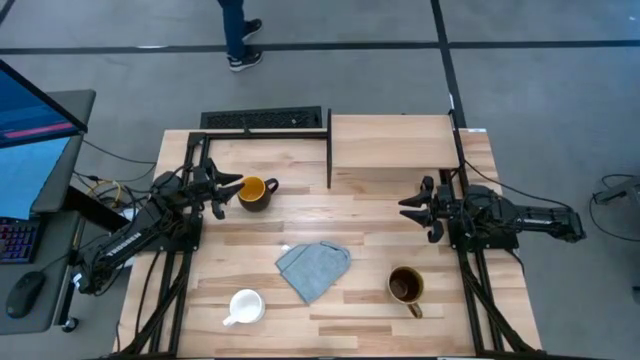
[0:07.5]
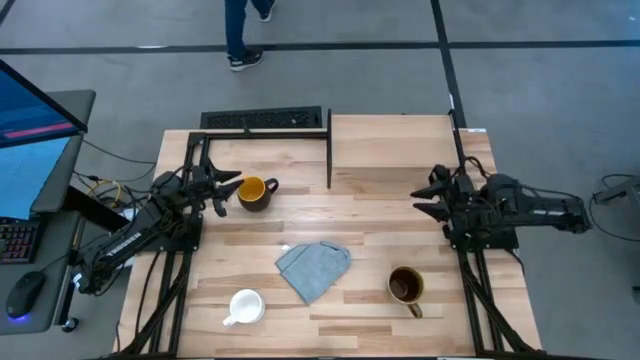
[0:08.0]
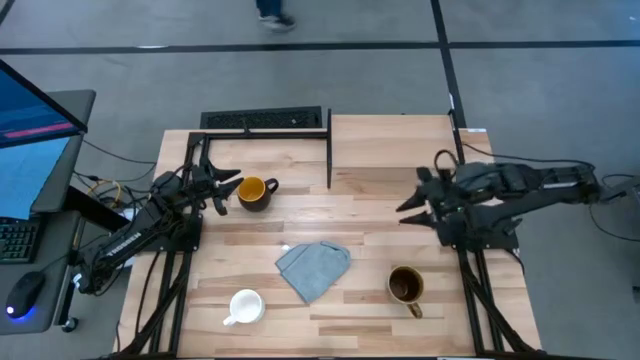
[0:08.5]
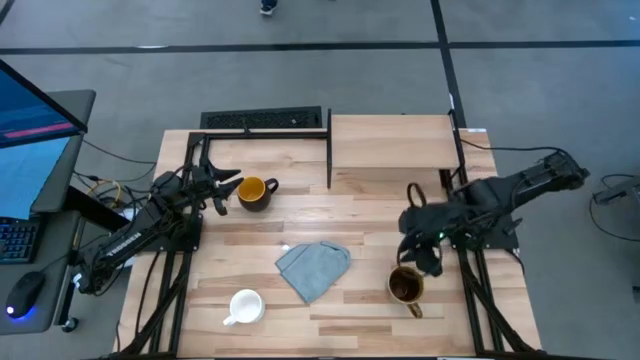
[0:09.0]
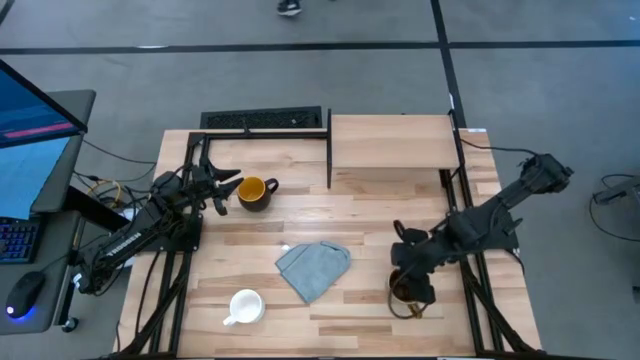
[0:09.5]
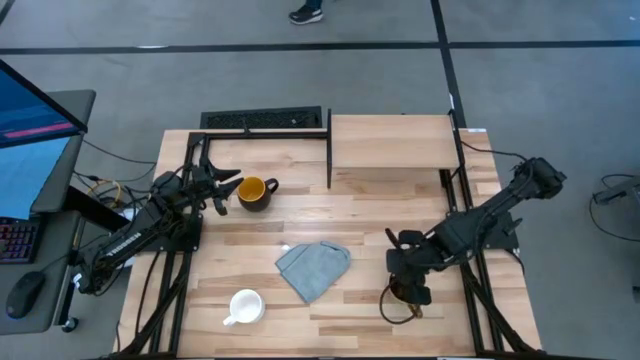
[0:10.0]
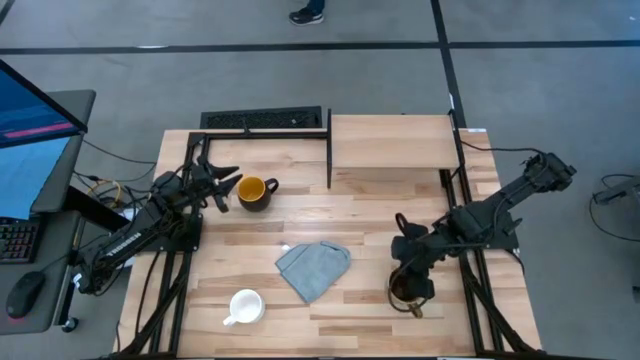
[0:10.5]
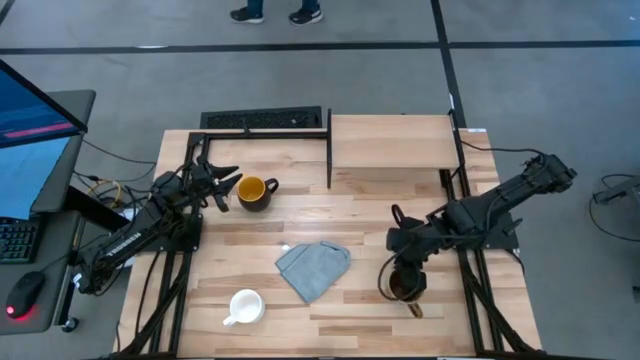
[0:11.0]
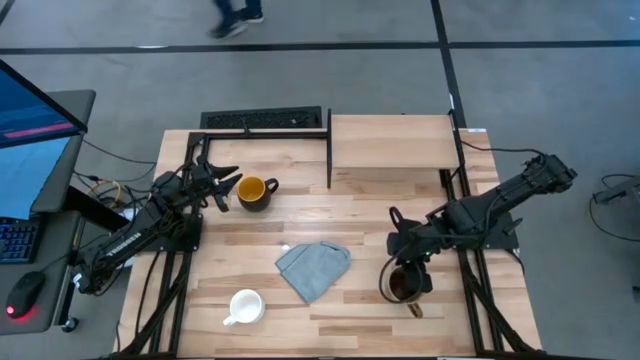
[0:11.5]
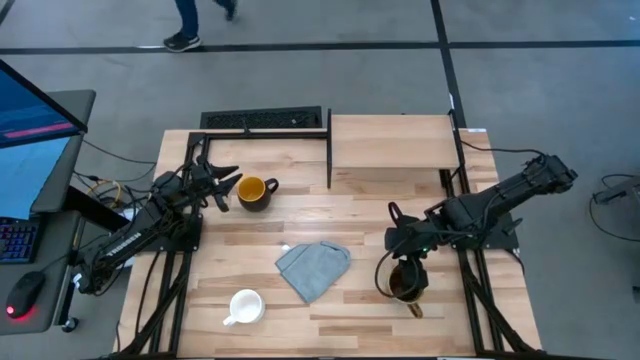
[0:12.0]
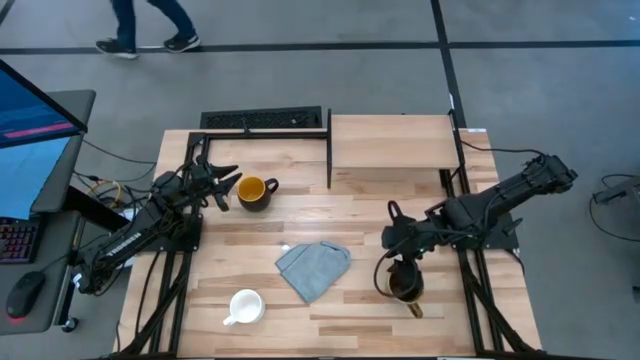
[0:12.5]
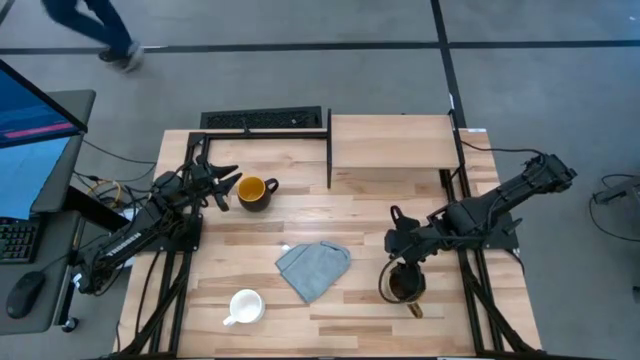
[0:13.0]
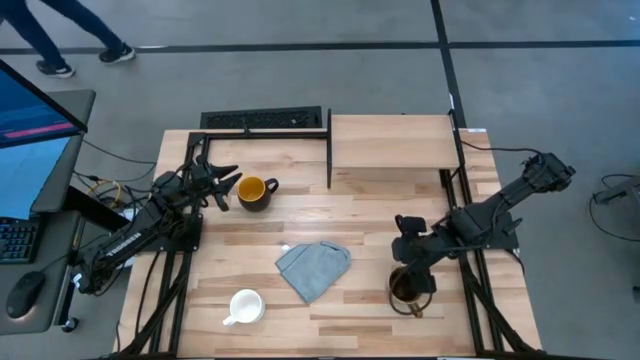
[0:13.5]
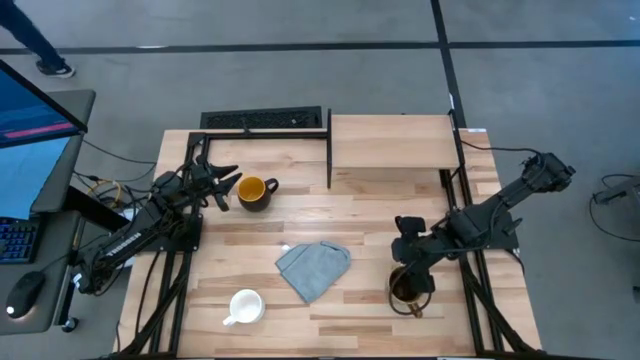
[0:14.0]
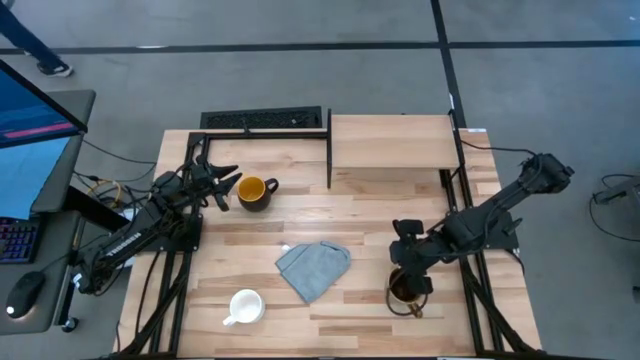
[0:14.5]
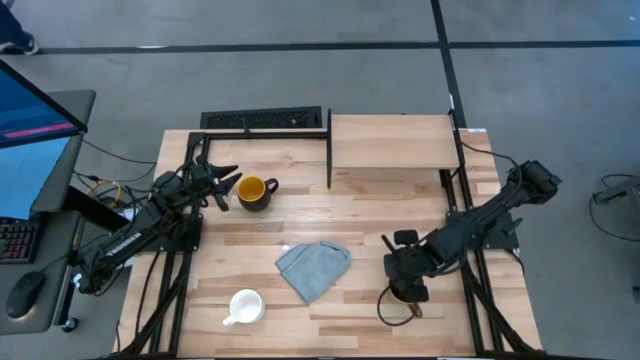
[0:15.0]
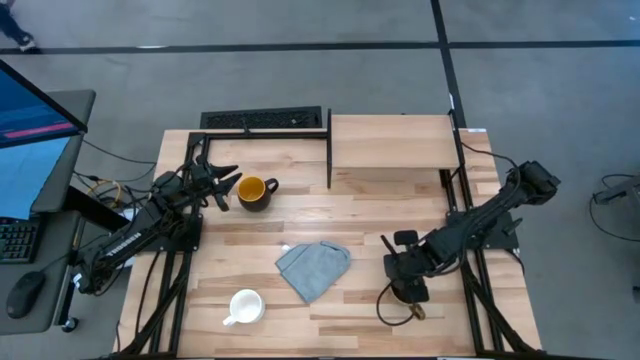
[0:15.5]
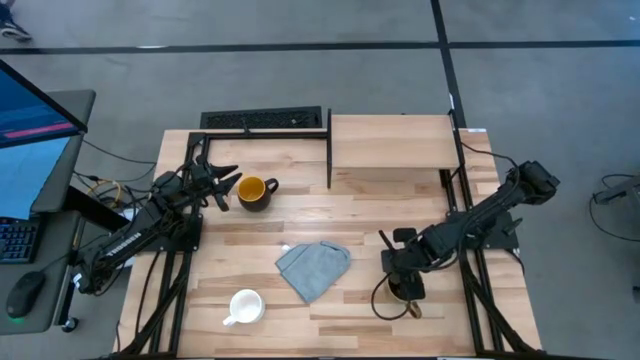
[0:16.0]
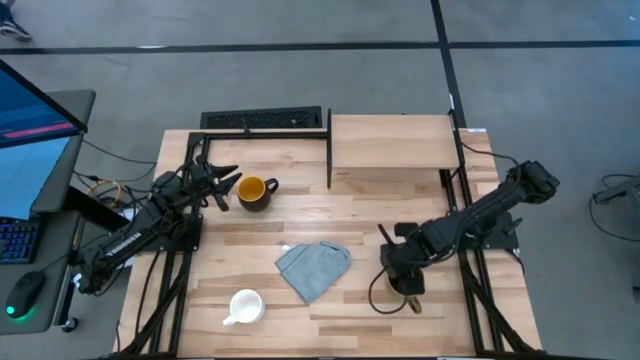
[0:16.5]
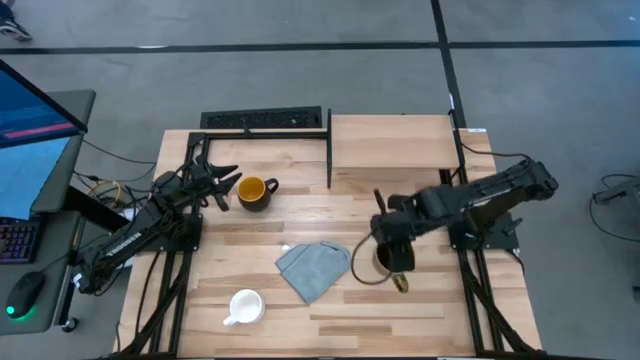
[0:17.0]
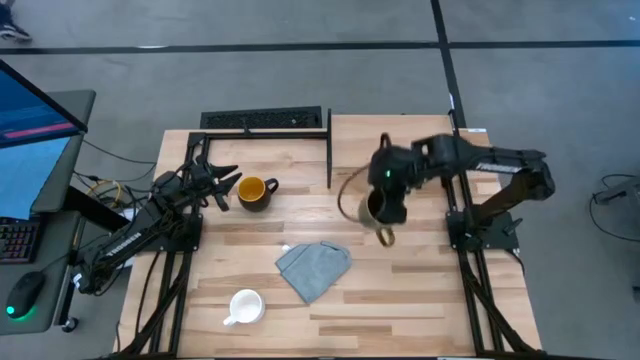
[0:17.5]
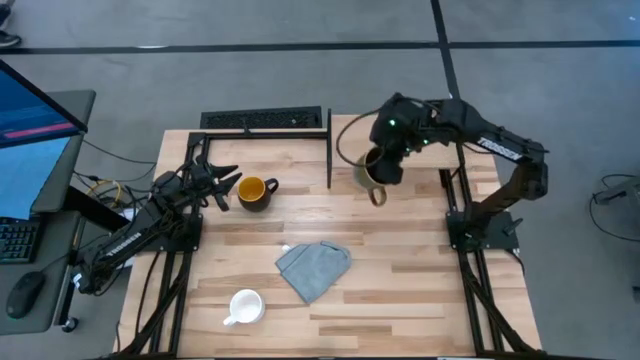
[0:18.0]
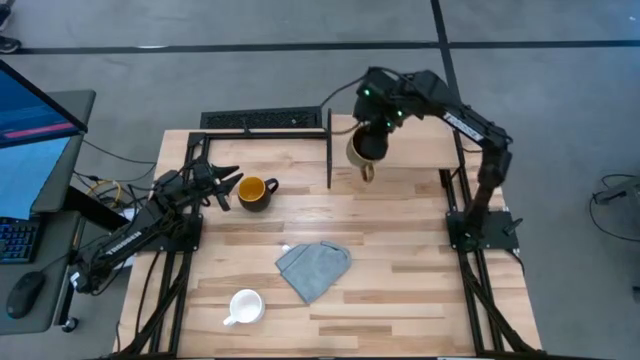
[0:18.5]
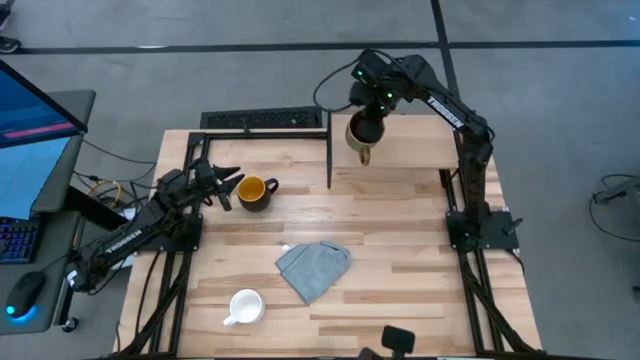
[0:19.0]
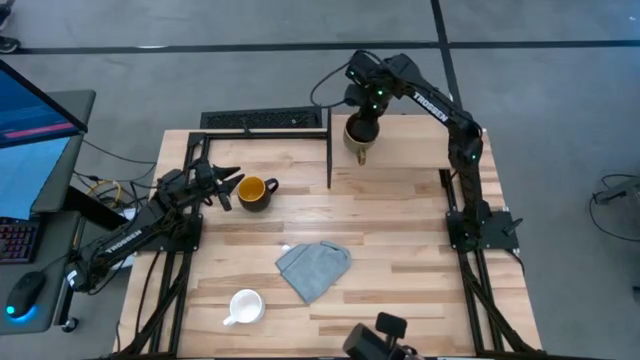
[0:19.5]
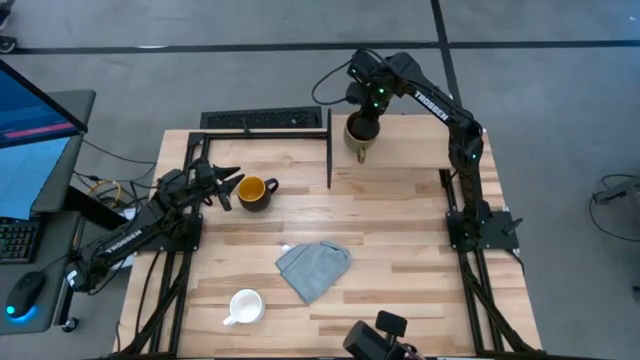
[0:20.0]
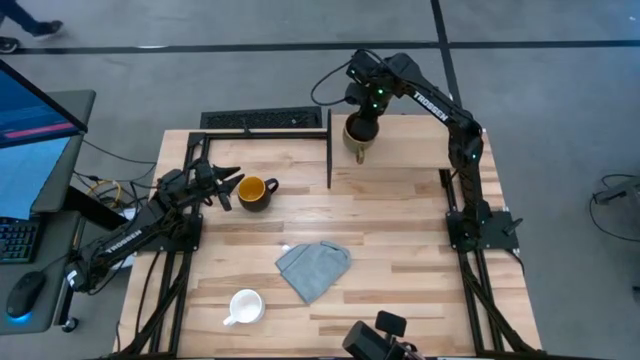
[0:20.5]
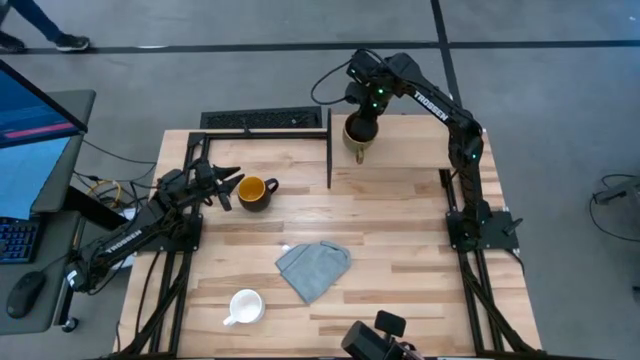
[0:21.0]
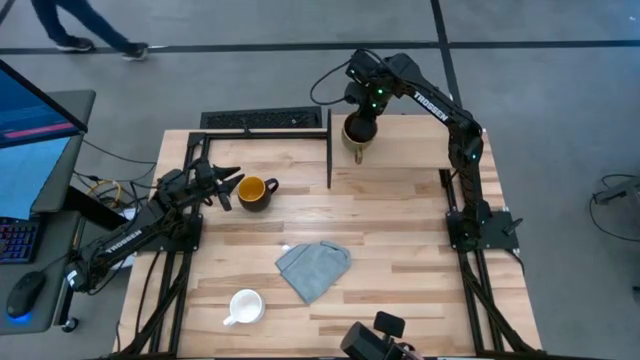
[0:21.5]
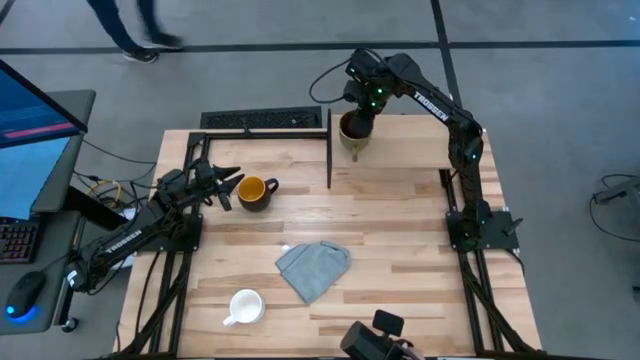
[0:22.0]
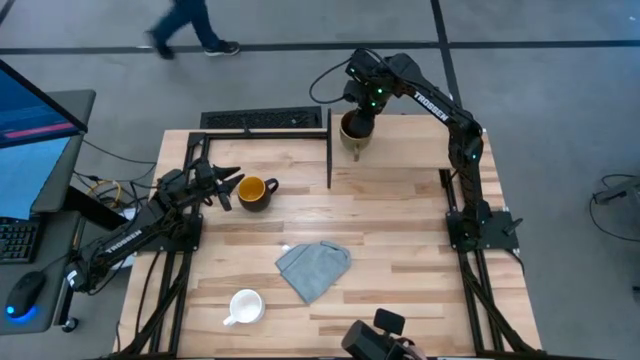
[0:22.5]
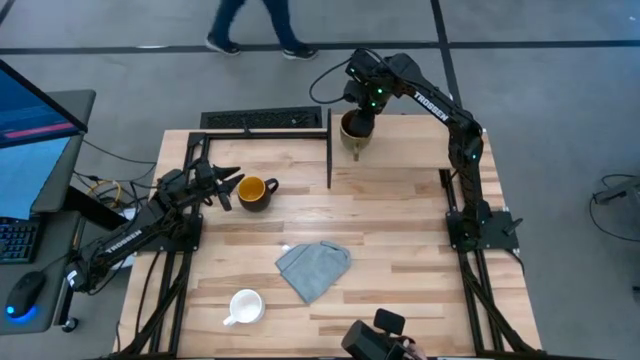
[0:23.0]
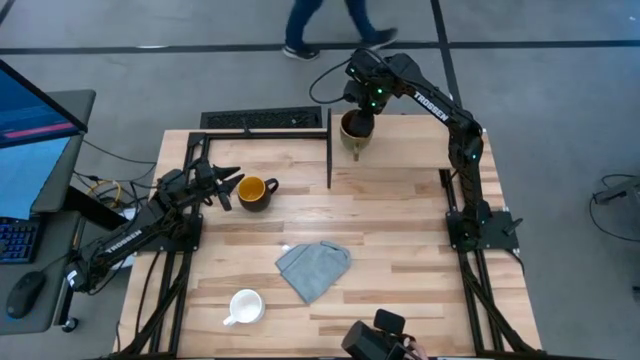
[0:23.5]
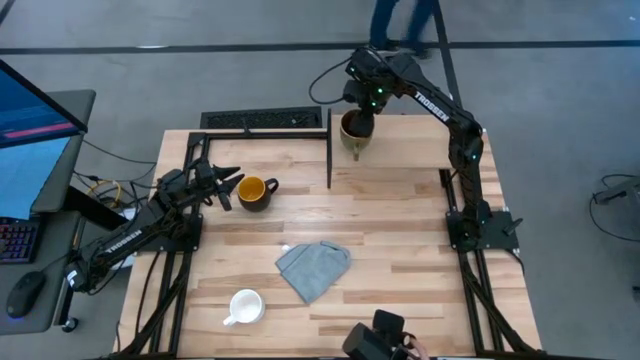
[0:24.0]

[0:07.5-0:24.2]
Task: Stack small to large cups/mugs on shelf
Put the green mug on the shelf
